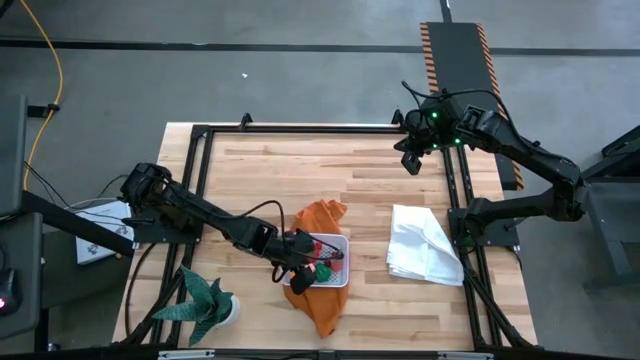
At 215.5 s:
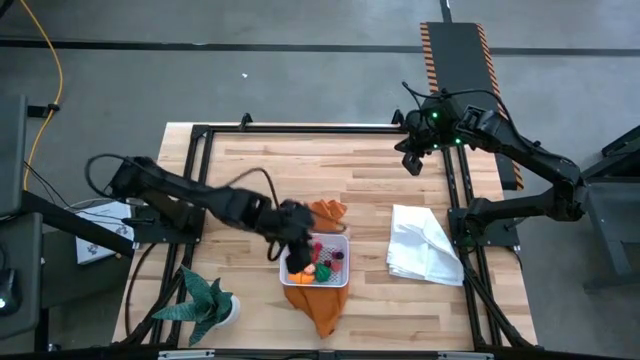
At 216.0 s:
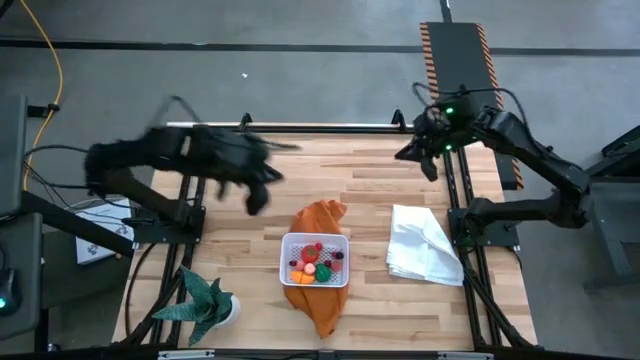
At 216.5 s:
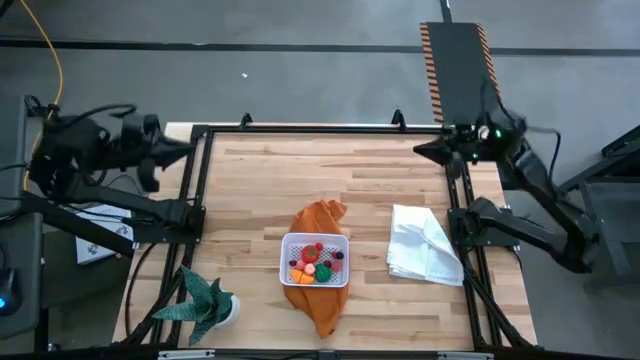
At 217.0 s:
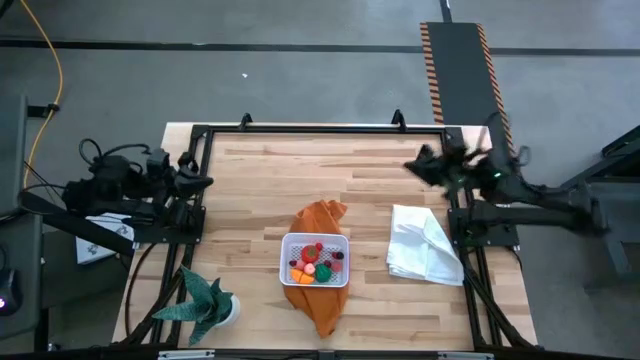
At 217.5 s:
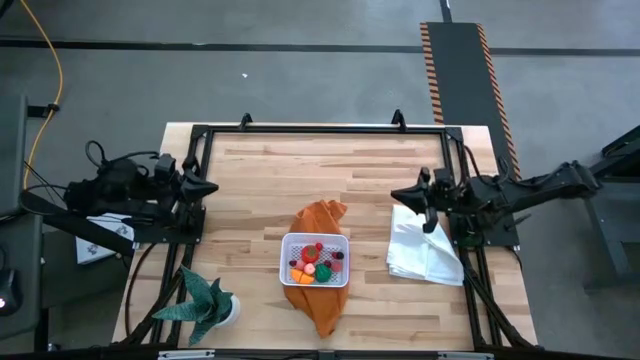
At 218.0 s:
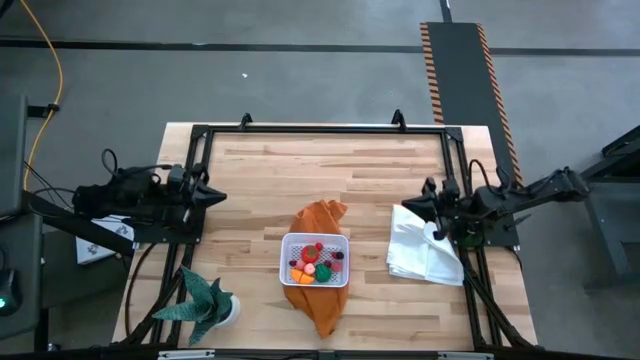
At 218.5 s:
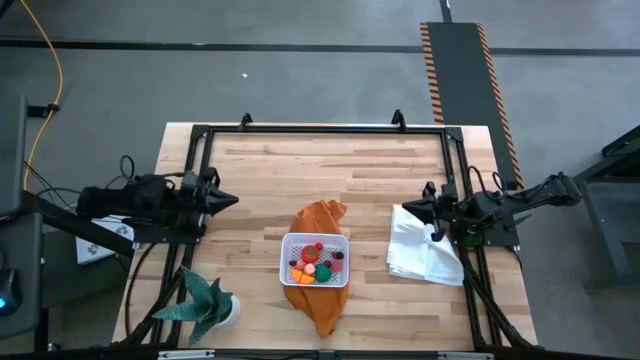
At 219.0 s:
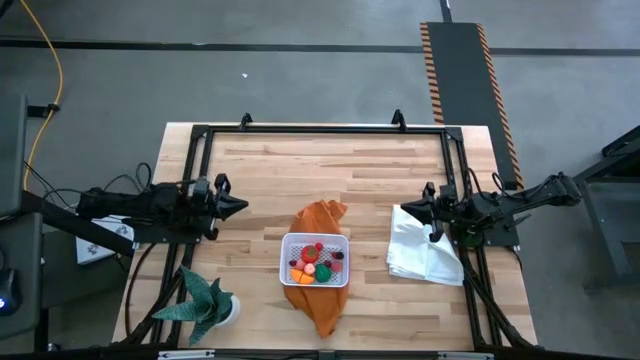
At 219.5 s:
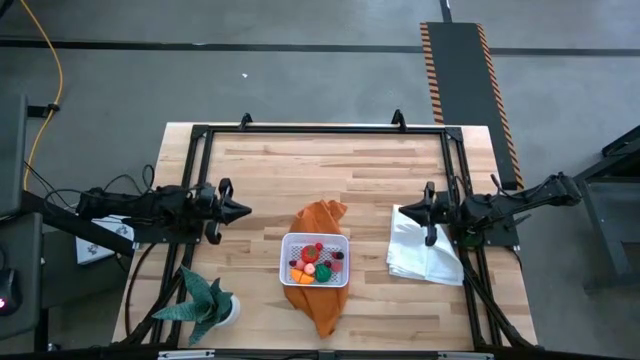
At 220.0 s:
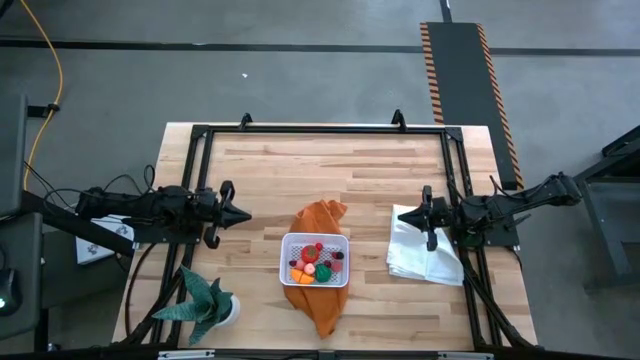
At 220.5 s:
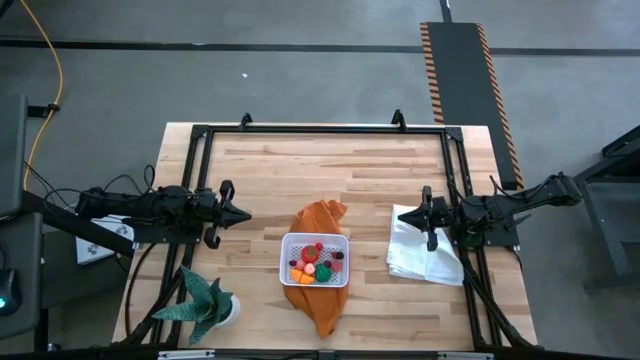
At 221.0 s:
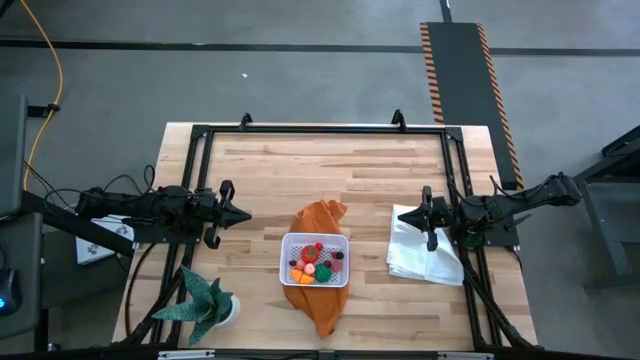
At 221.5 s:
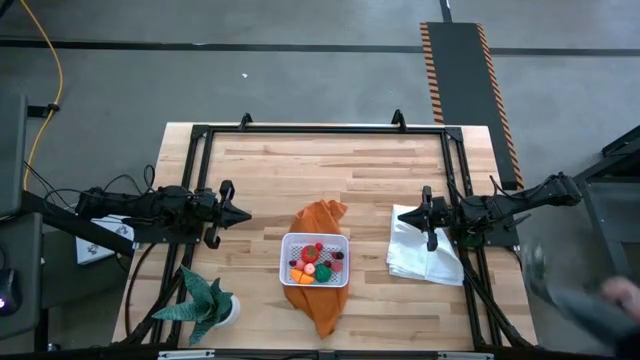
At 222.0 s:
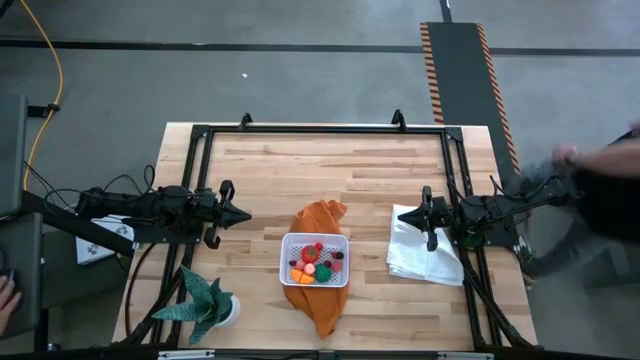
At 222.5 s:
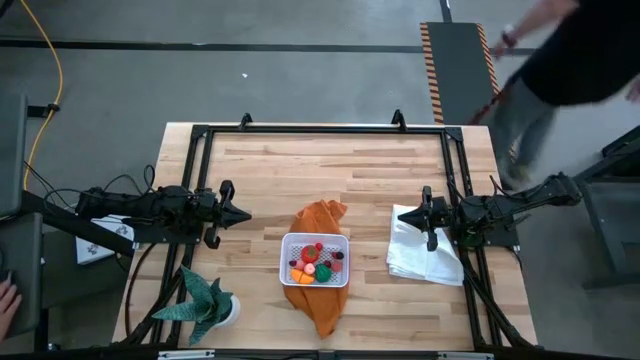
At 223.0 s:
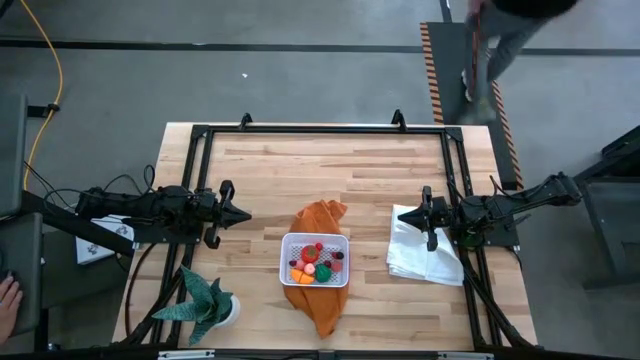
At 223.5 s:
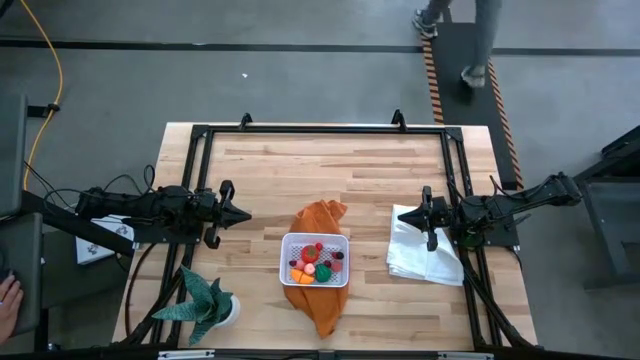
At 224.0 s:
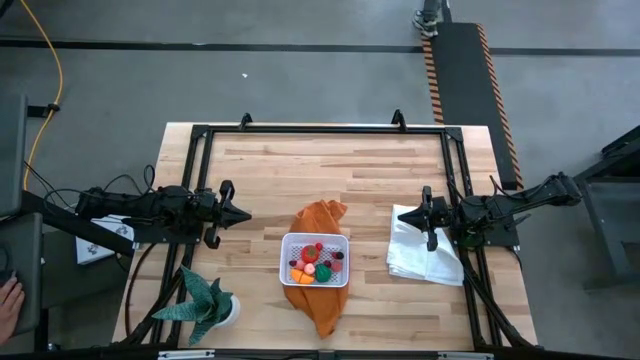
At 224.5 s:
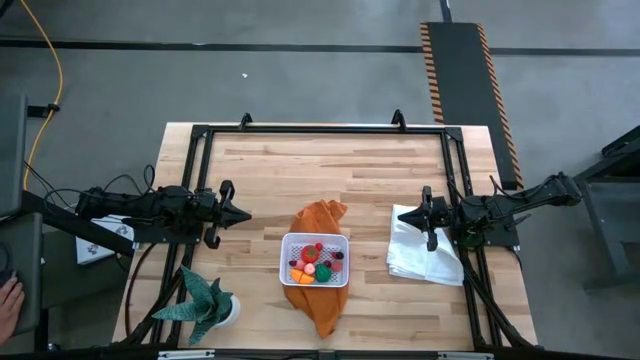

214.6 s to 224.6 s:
Task: Pick and placing Produce into tupperware
Return to Home Position

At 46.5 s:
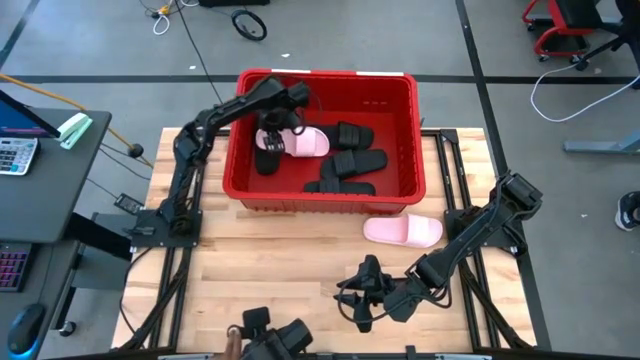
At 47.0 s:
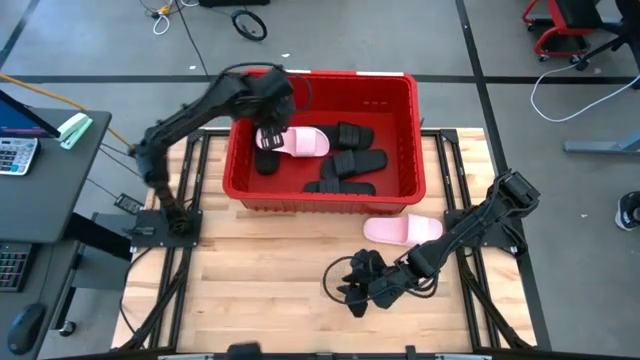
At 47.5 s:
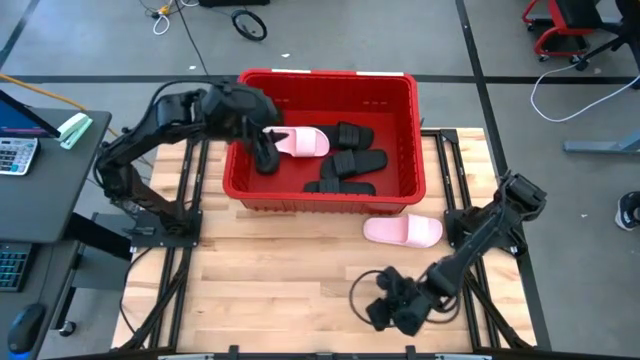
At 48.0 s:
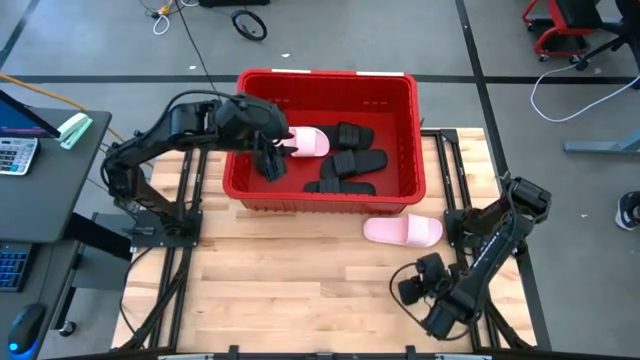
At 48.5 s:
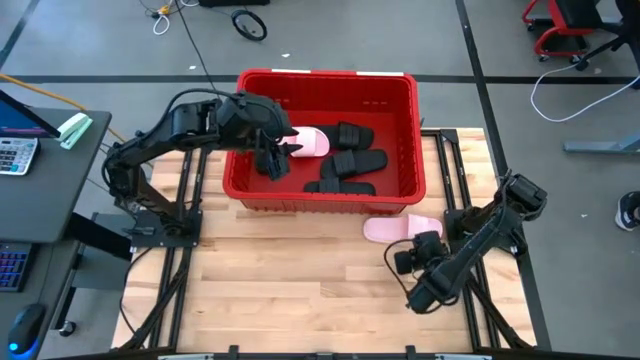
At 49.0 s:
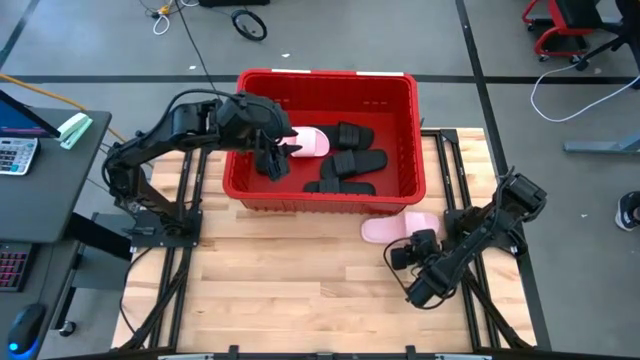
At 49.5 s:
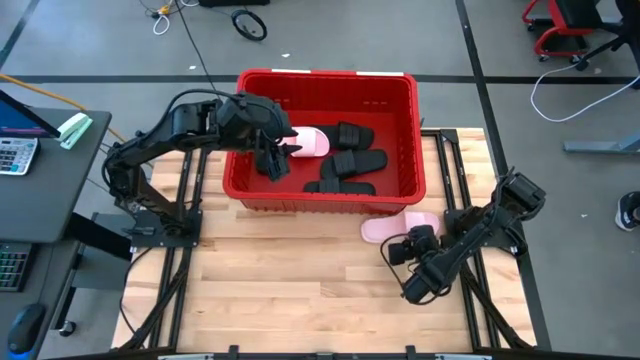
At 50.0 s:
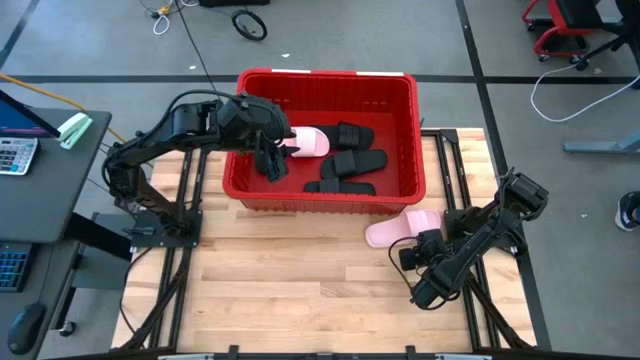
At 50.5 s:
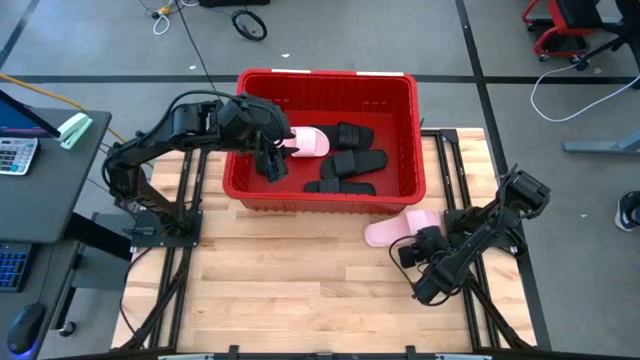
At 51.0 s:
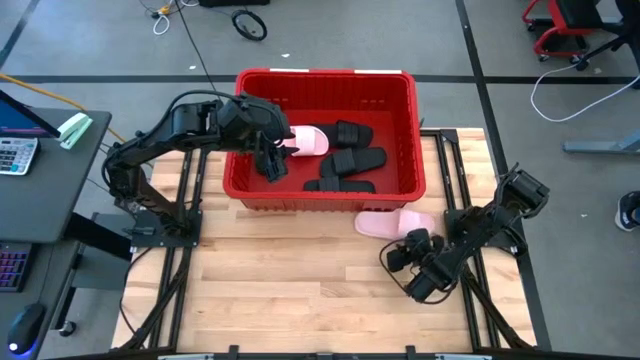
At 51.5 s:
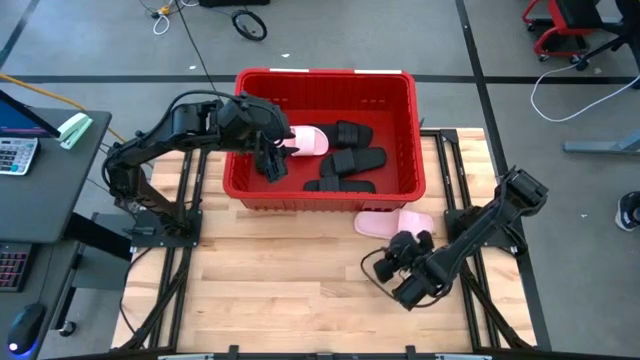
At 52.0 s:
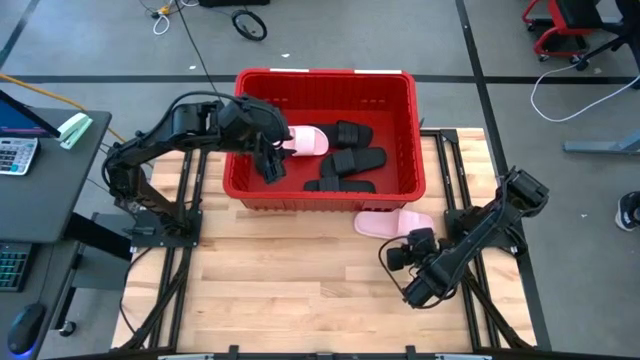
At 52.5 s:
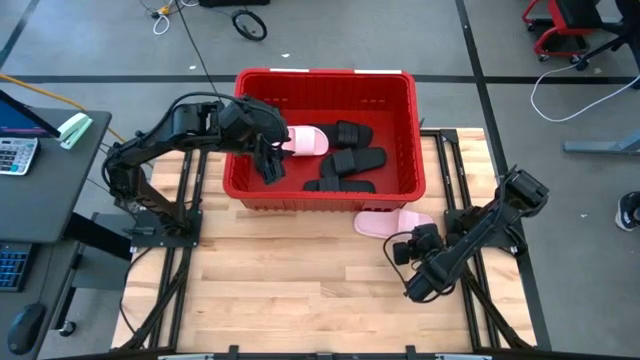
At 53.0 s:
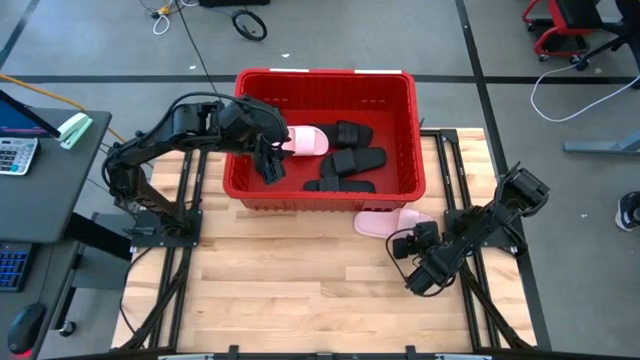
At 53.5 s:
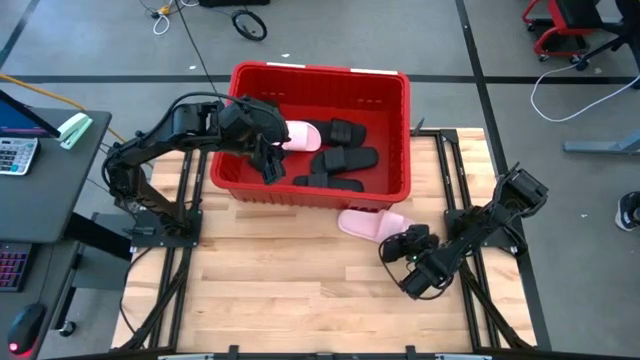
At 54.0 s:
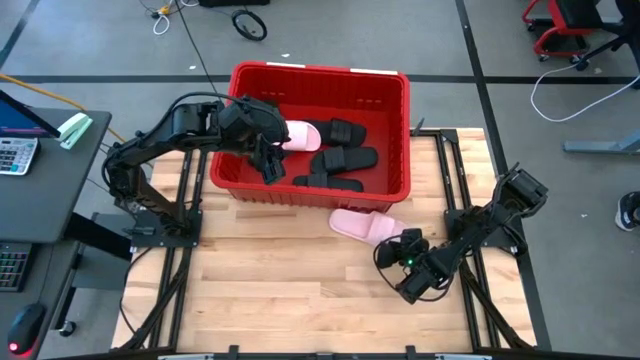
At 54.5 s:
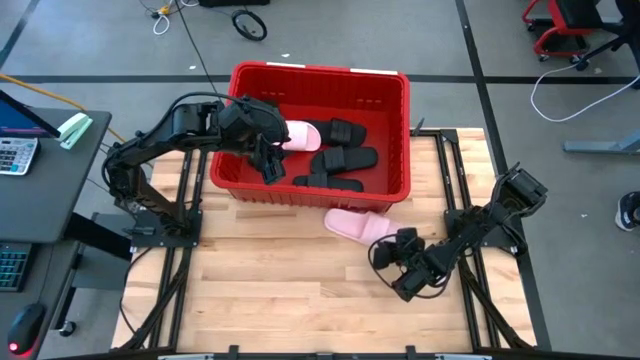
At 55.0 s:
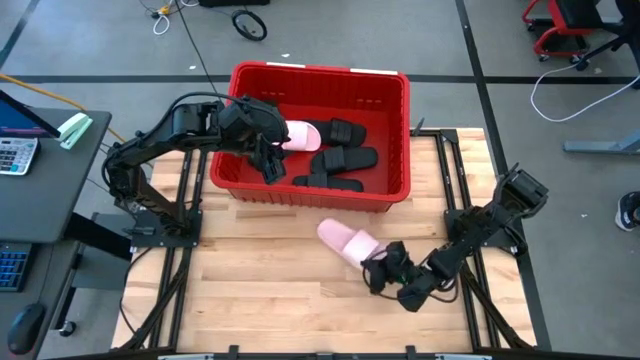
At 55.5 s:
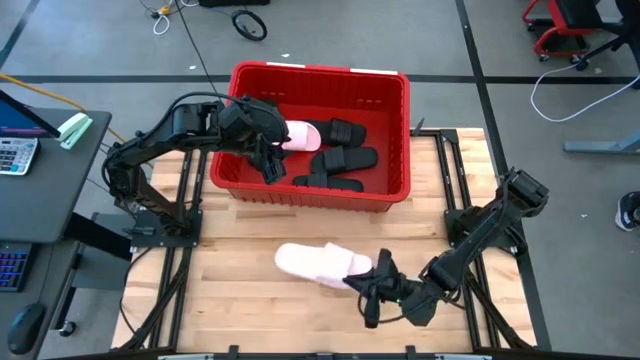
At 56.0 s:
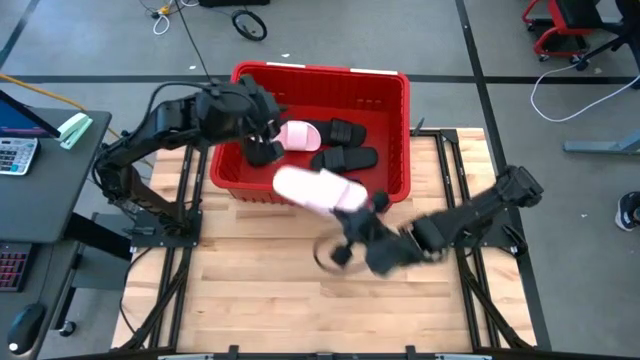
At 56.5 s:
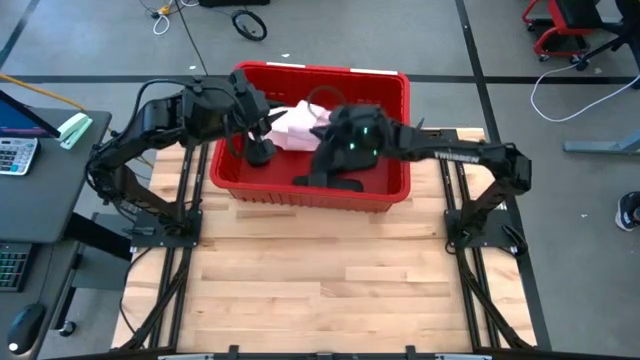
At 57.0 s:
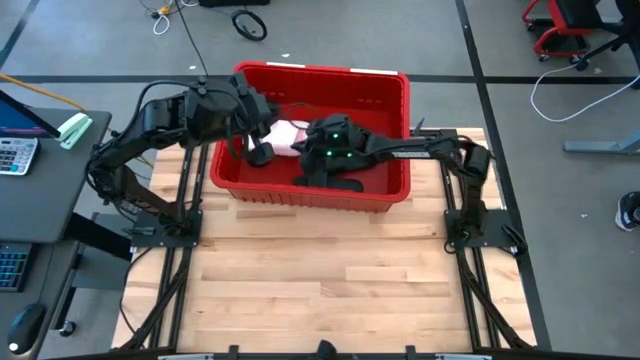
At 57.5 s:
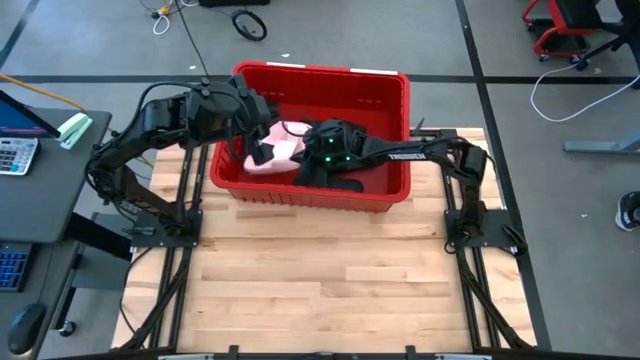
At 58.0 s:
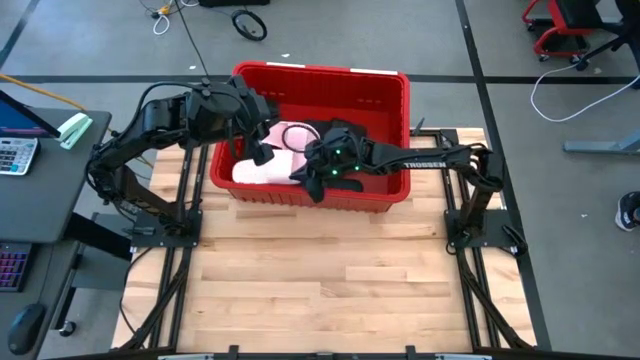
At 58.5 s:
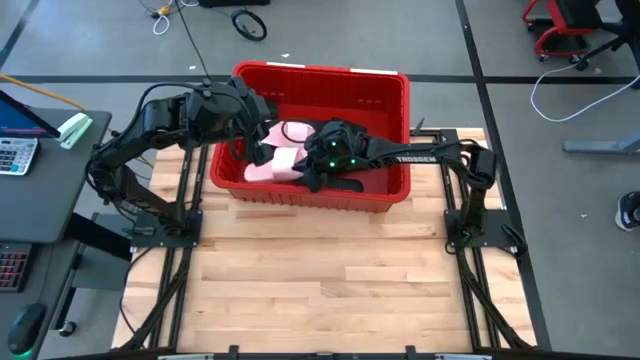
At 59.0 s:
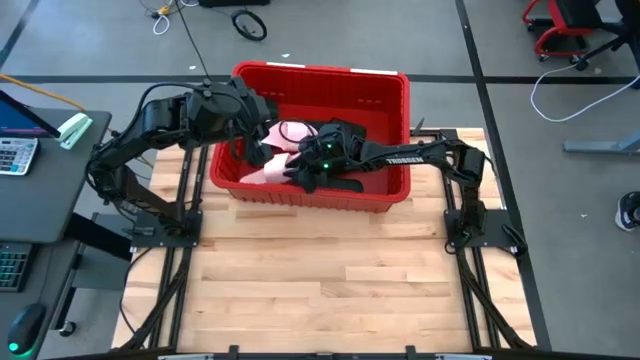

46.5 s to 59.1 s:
Task: Pick and place slides into bin
Put the pink slipper into the red bin
